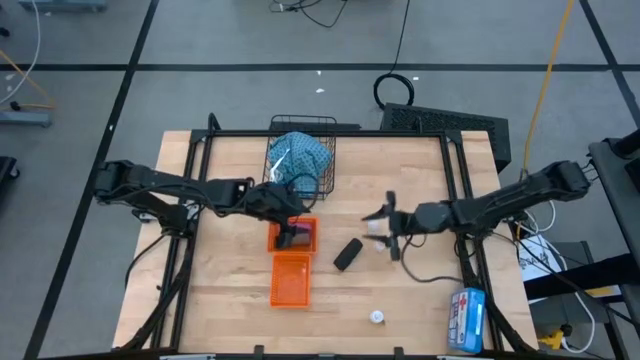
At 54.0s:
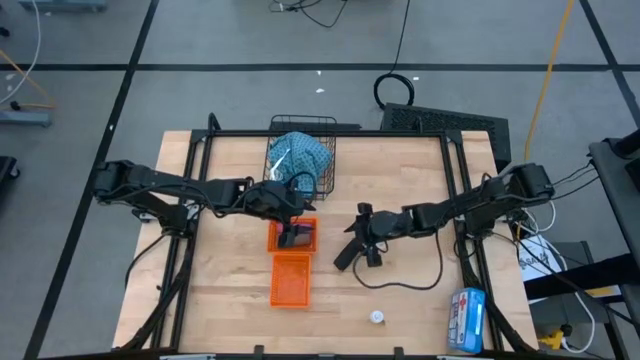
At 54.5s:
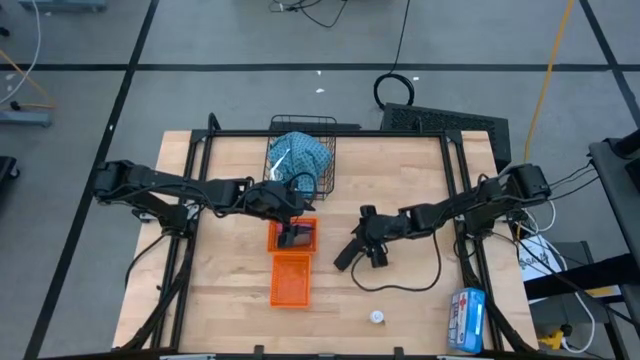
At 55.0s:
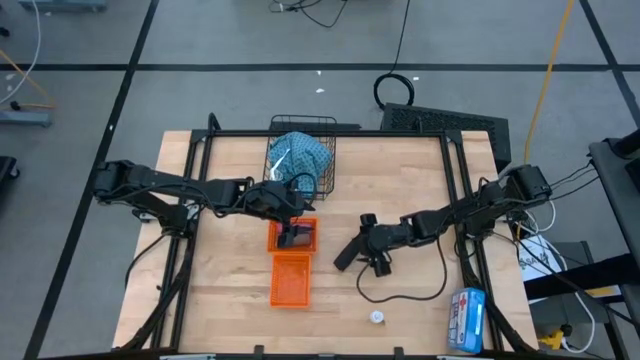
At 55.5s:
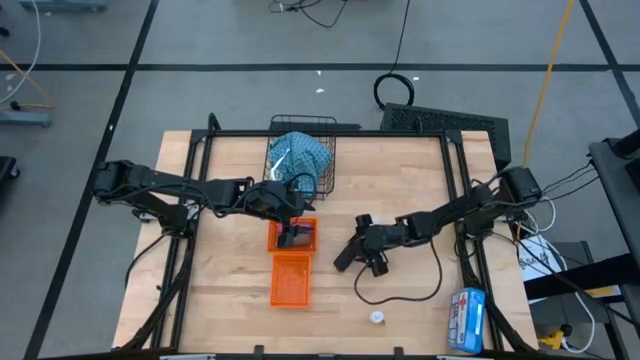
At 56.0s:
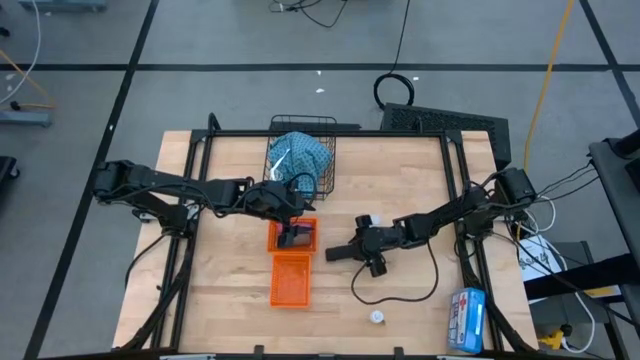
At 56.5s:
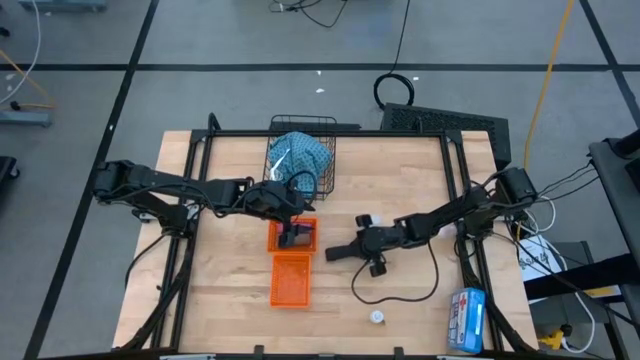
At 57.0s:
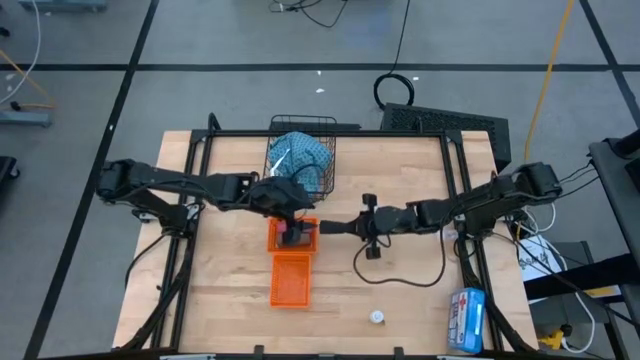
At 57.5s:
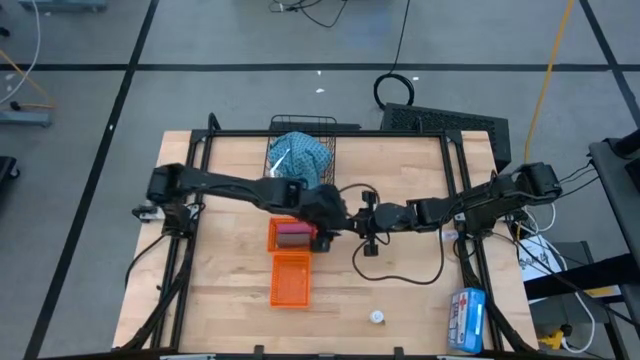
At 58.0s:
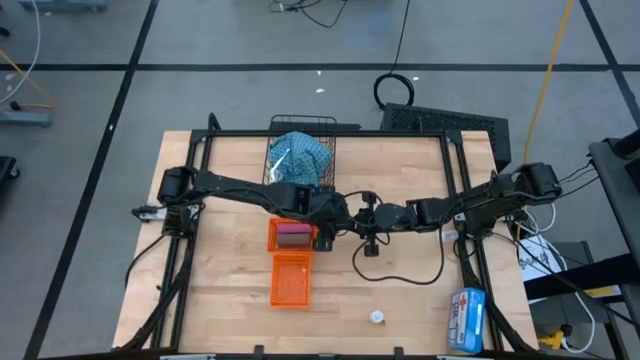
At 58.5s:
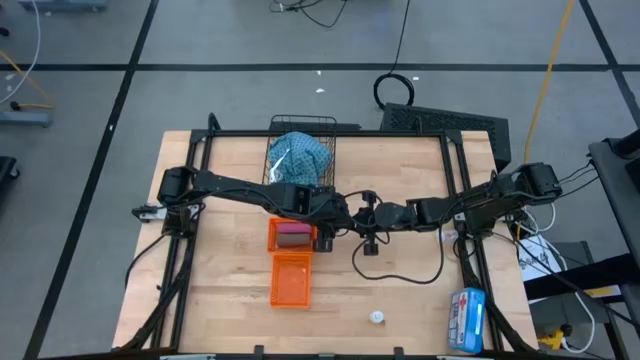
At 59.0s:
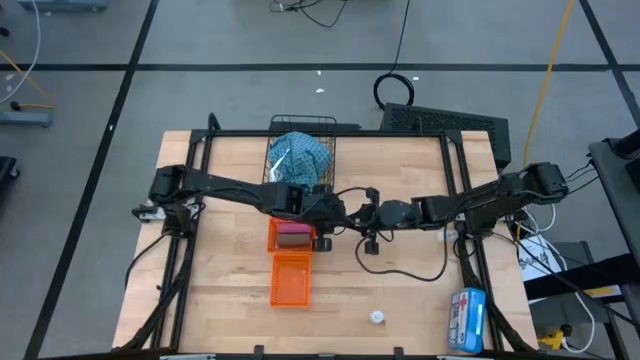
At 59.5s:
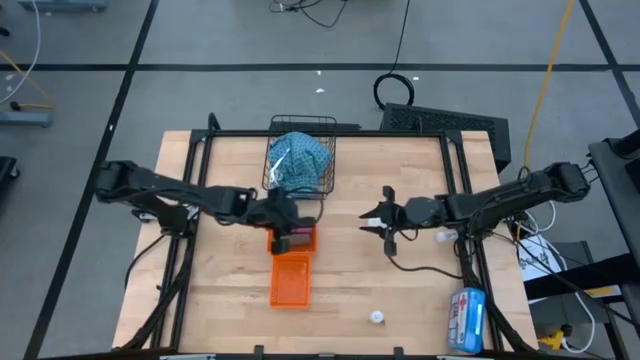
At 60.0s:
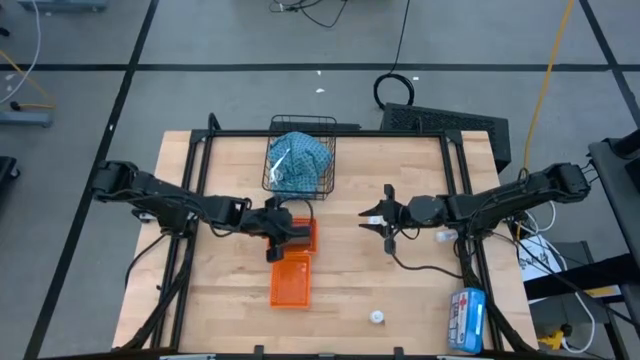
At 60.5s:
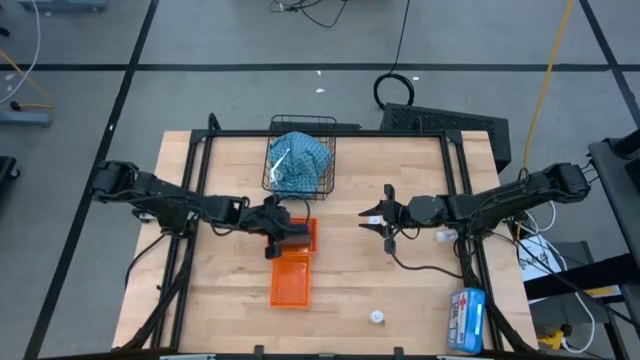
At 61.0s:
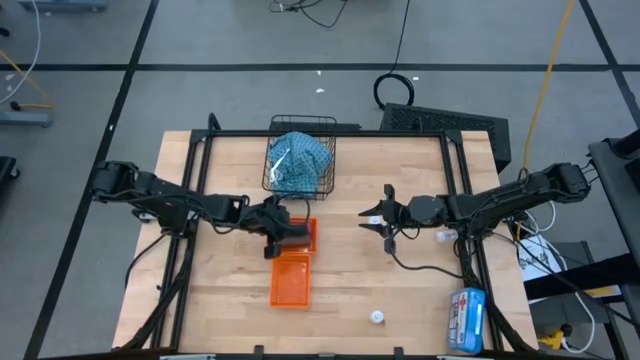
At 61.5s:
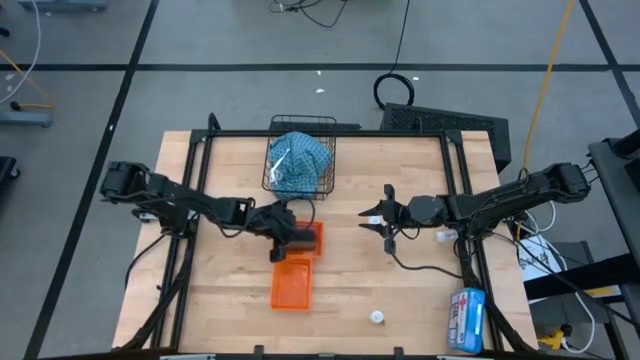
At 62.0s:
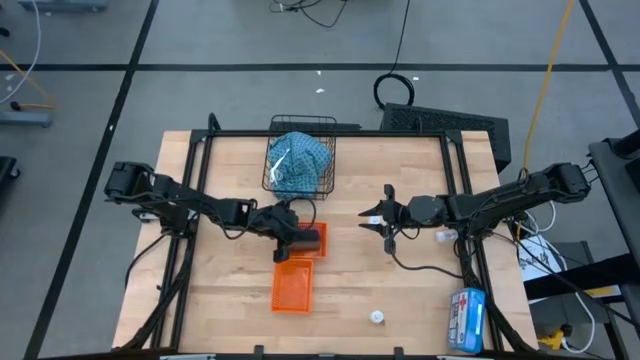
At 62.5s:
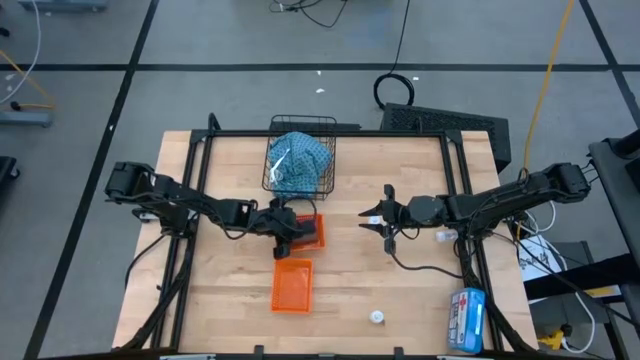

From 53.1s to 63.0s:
Task: Pick & Place Medicine items
Put the black bandage into the top orange bin

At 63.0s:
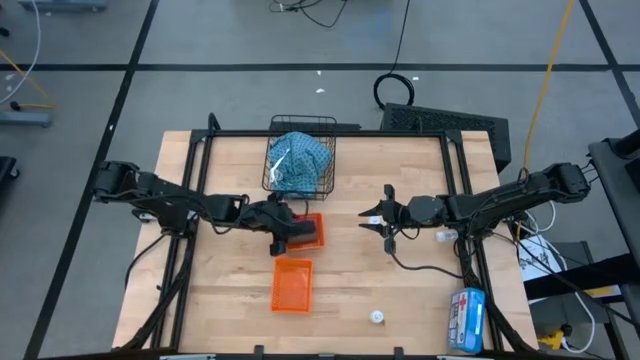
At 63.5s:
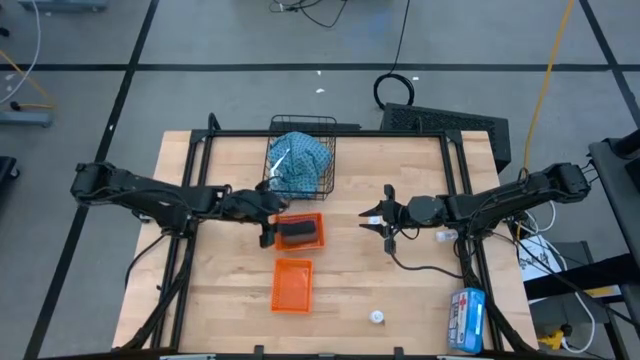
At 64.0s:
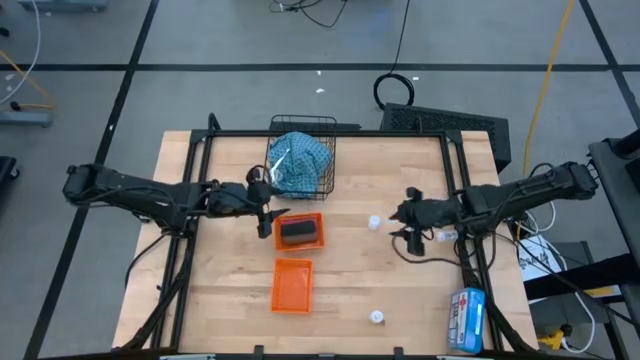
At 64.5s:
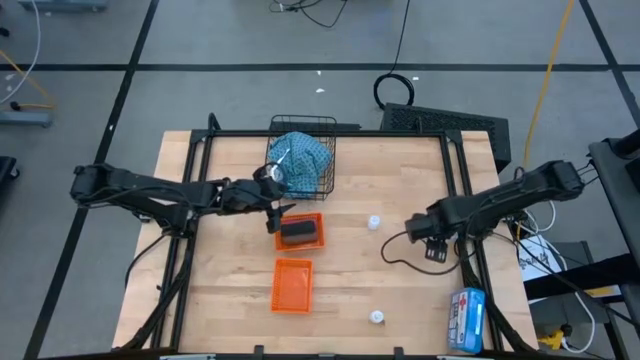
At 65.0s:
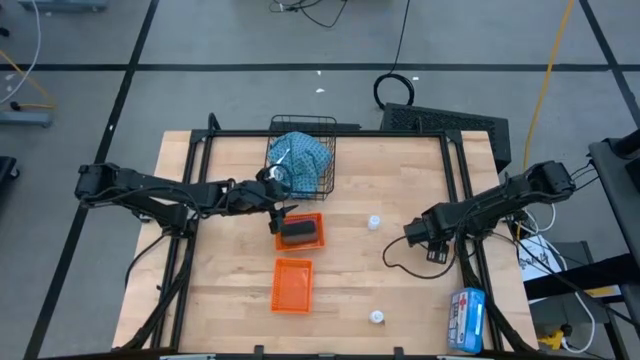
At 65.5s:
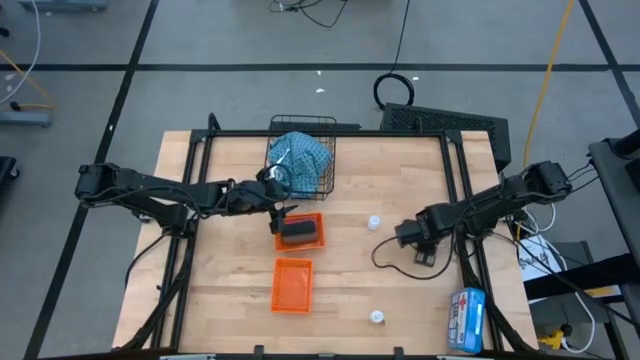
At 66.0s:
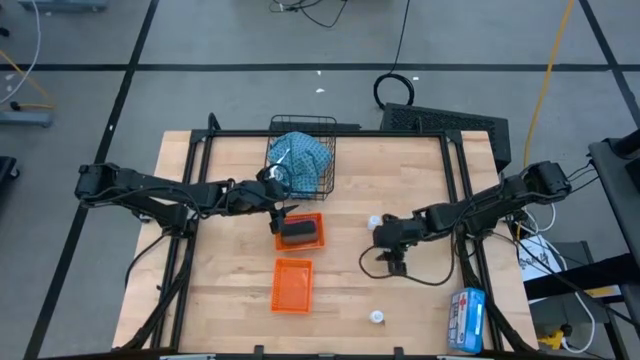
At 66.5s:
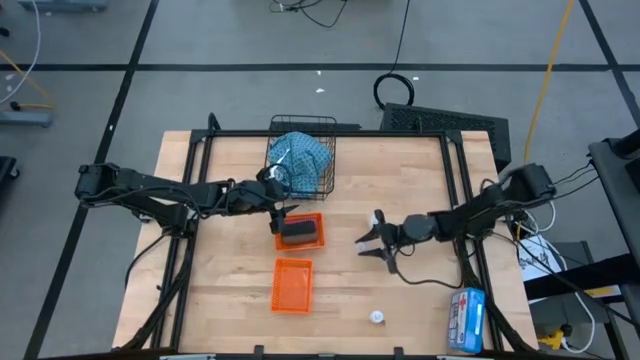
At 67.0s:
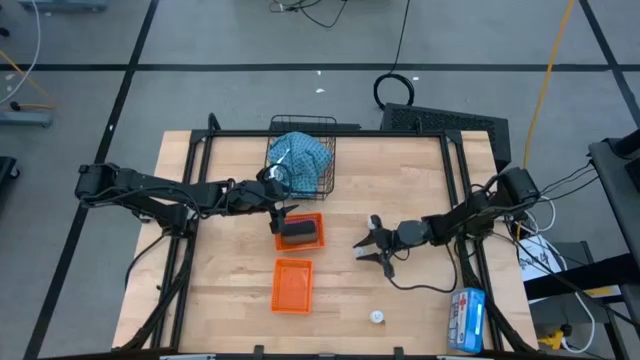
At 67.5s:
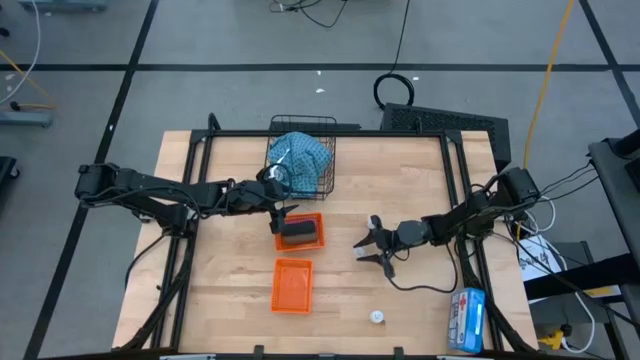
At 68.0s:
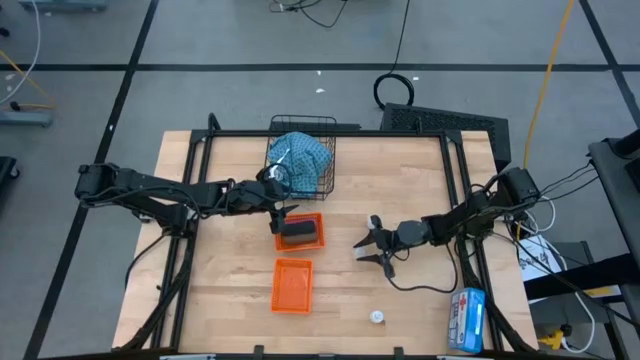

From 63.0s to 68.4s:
Move the right white medicine bottle to the middle of the table

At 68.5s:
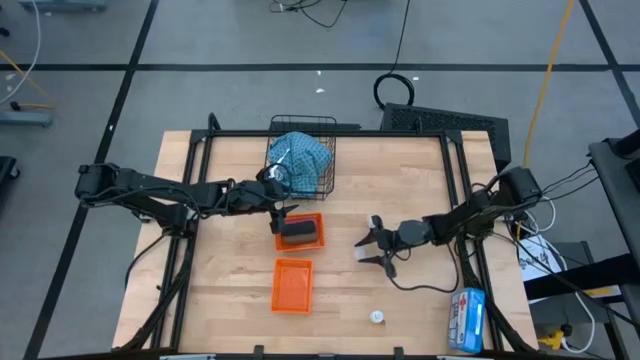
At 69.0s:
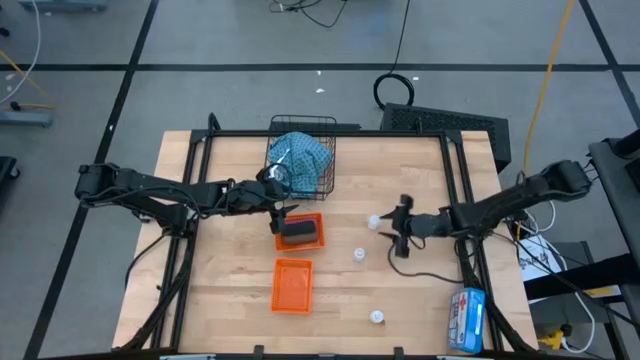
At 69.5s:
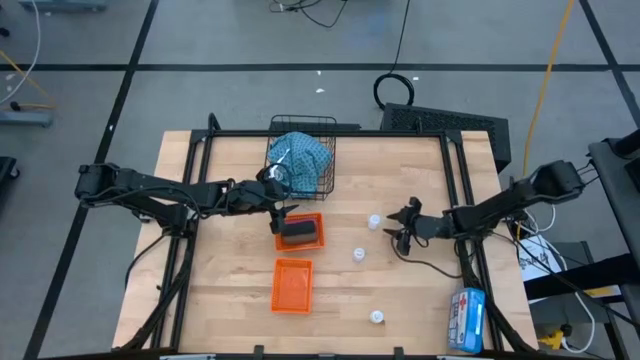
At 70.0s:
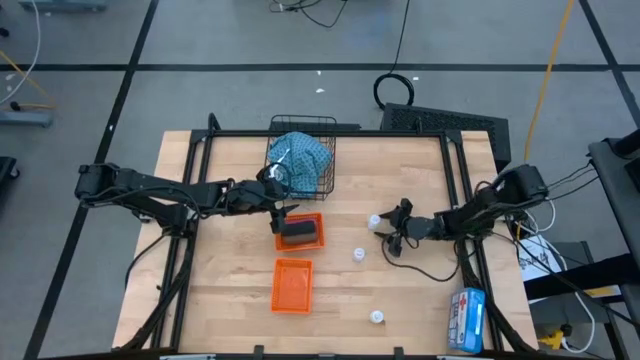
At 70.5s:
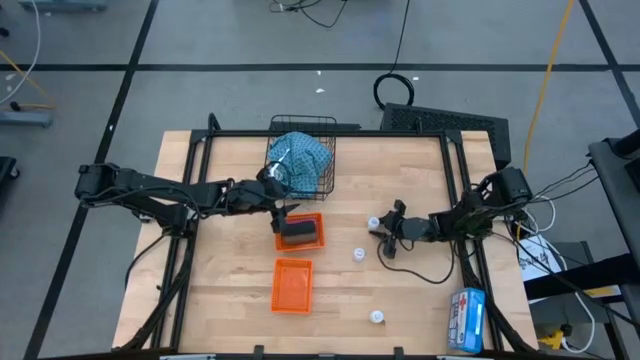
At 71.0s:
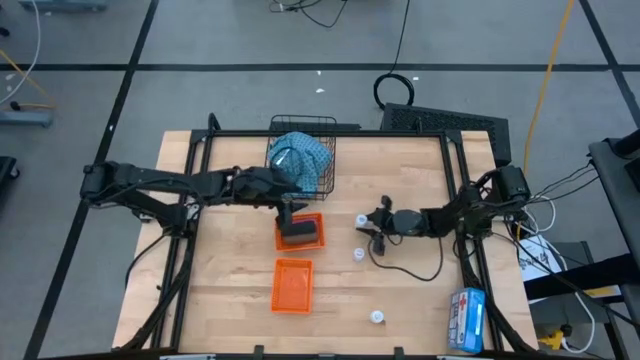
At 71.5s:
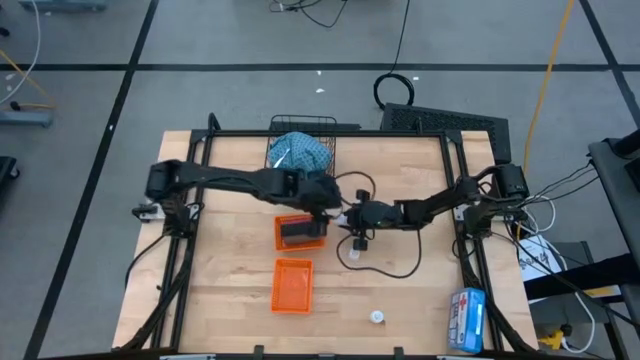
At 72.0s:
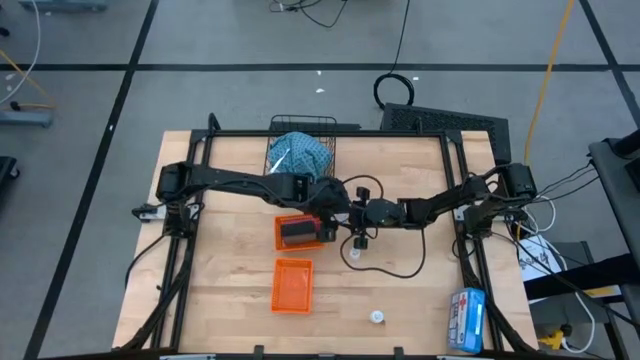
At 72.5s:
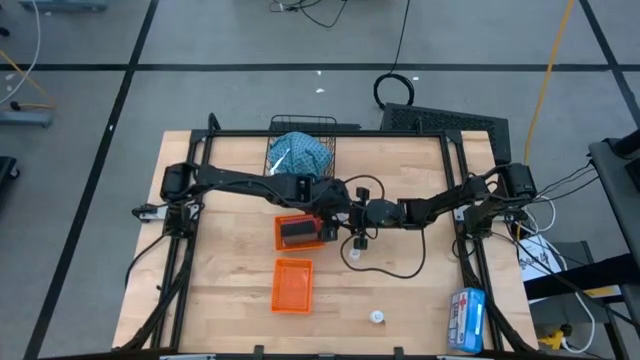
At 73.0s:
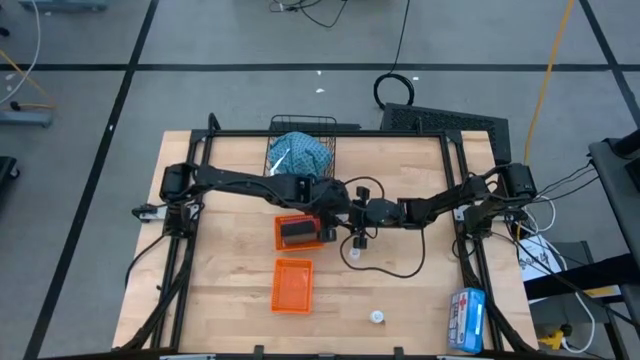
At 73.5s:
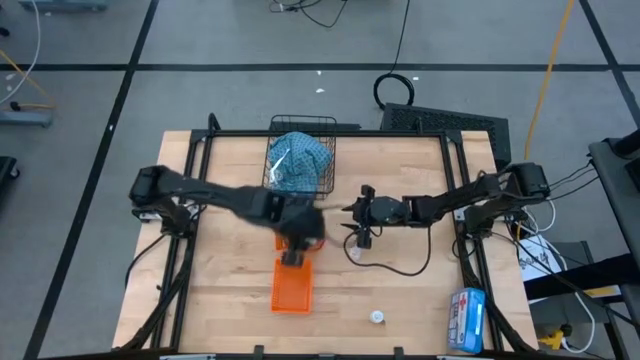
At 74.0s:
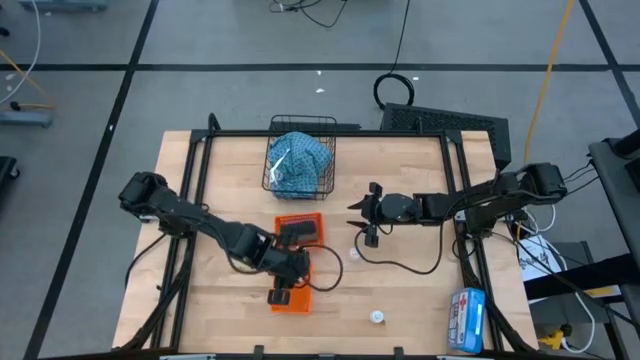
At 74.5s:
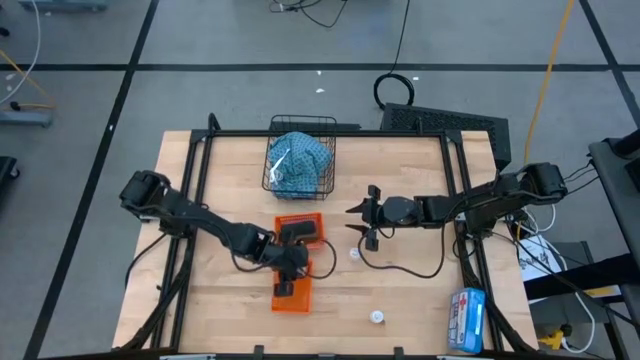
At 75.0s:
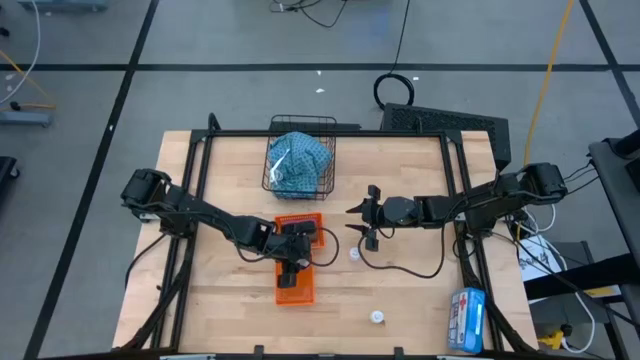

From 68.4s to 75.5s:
Put the top white medicine bottle into the bottom orange bin
